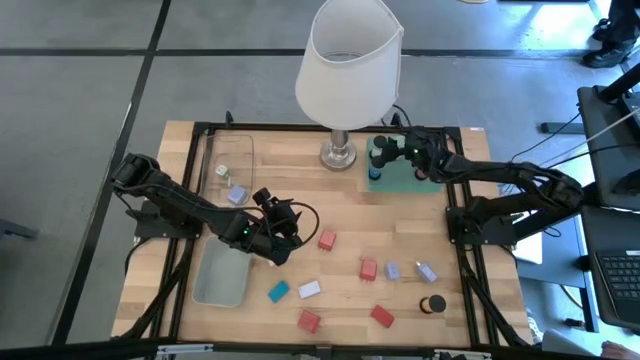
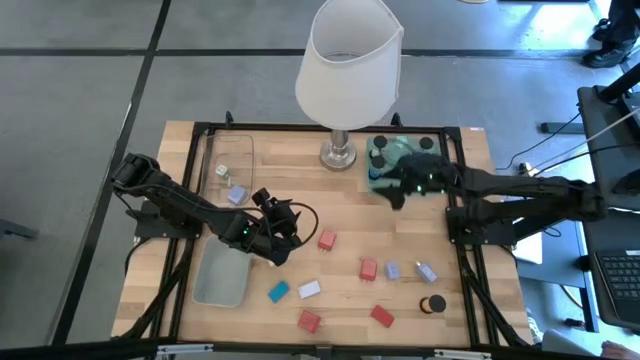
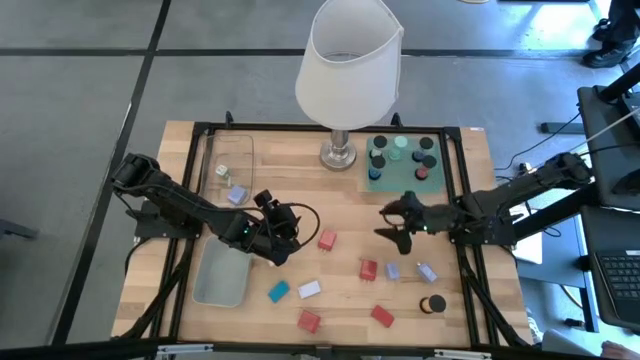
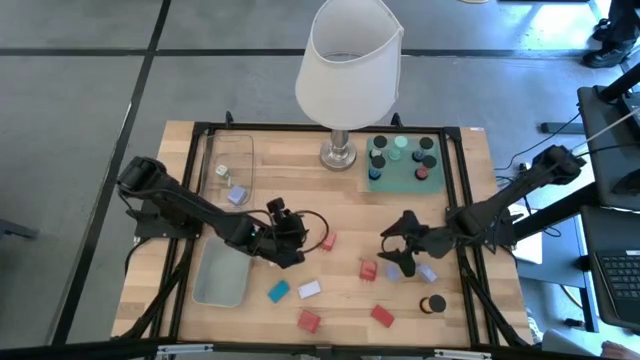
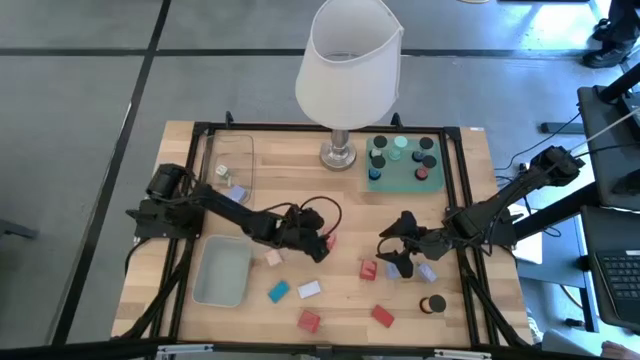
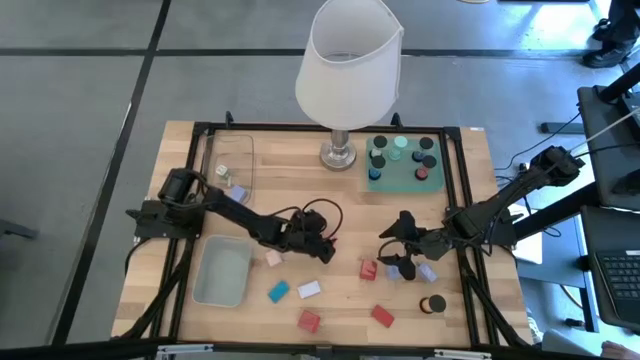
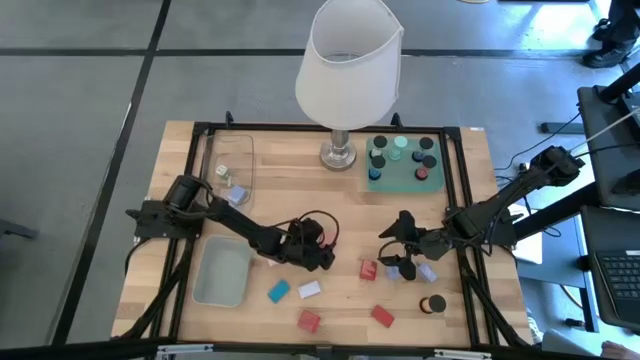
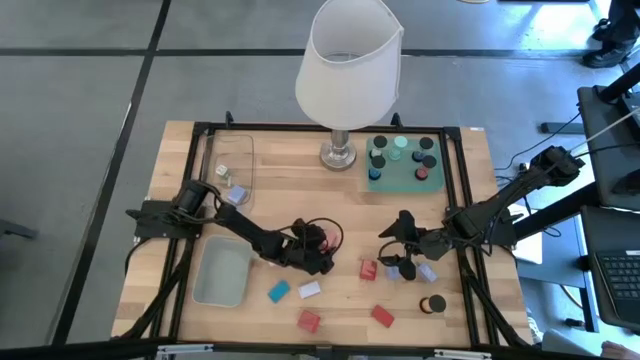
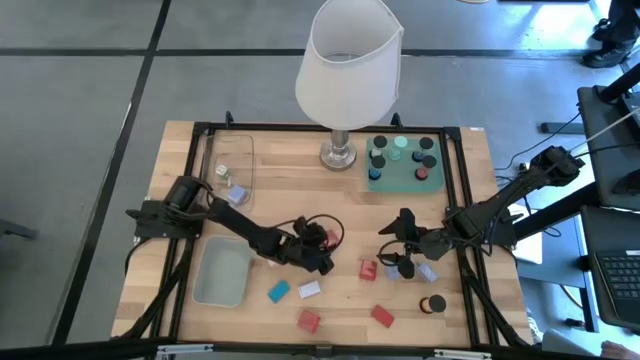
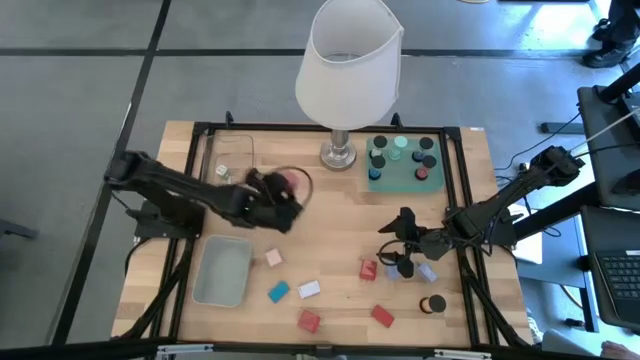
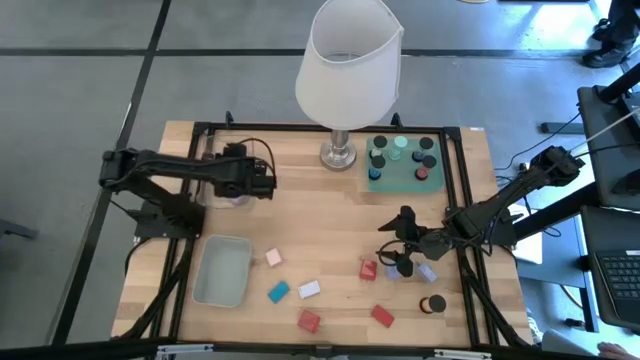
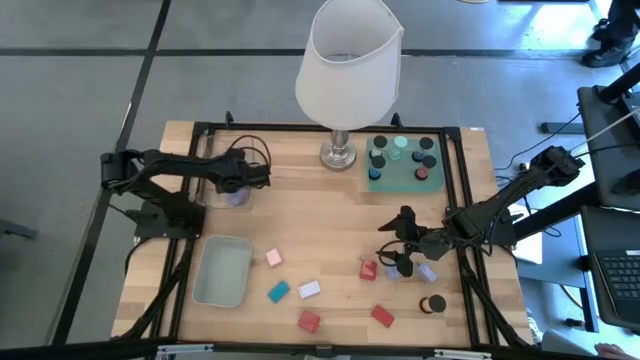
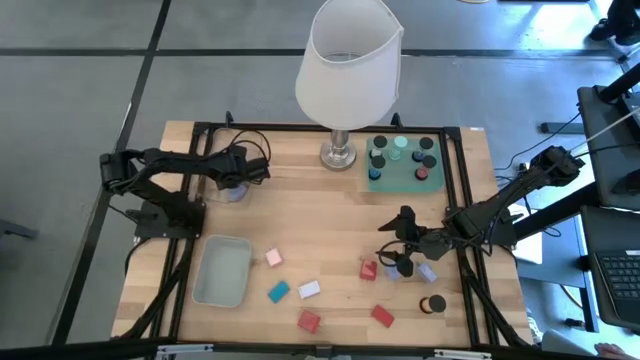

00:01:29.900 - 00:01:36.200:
Task: Pick & Place Office items
Put the red charger adapter into the transparent bin

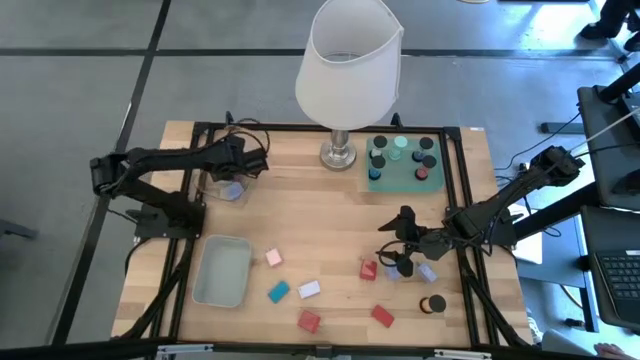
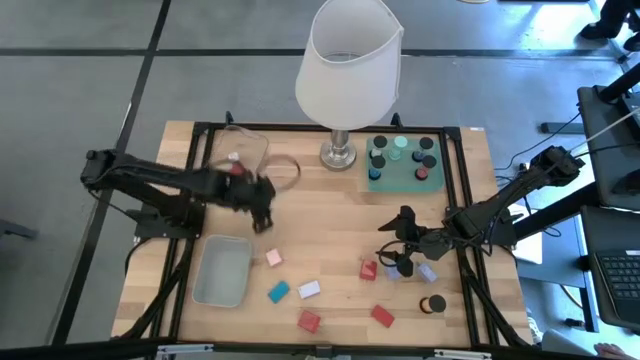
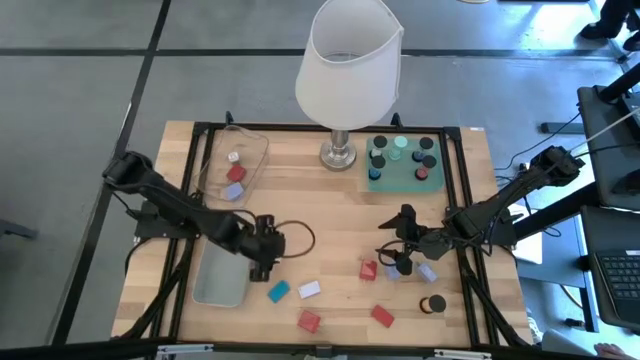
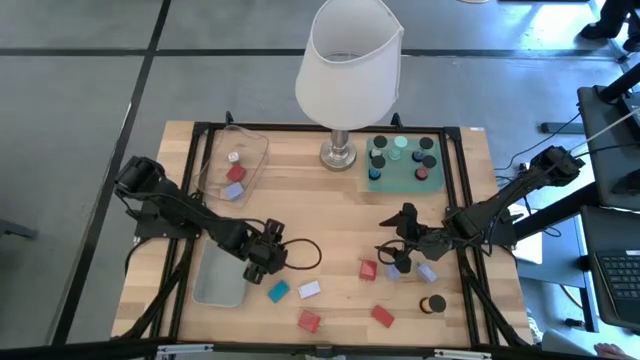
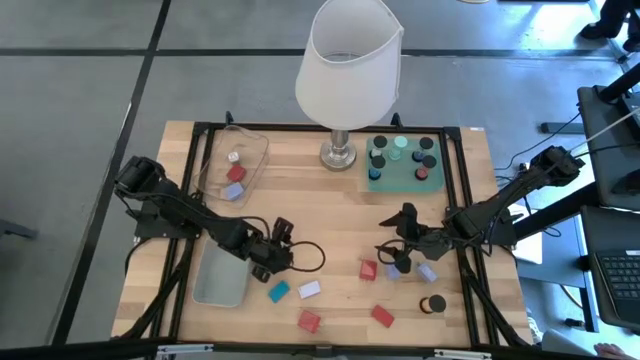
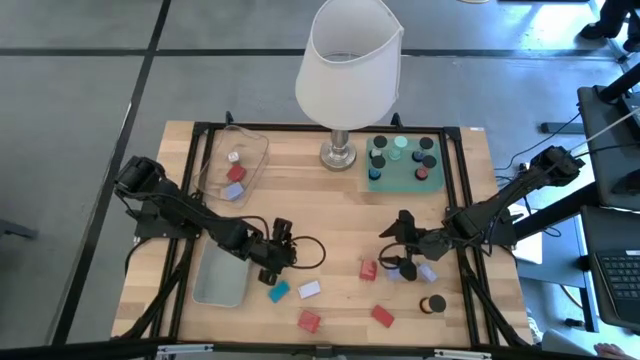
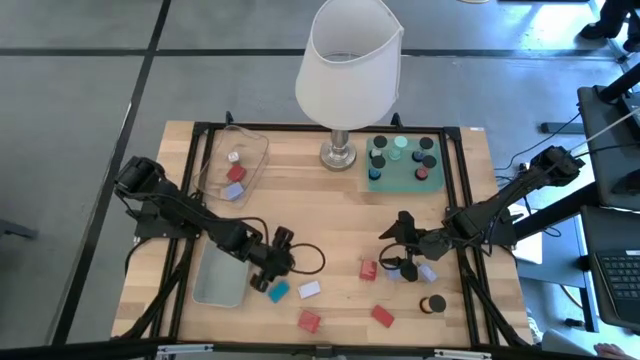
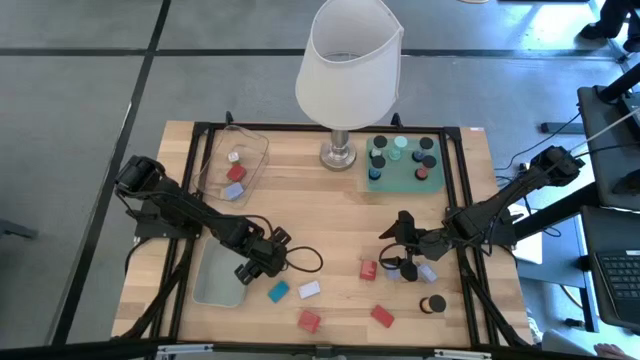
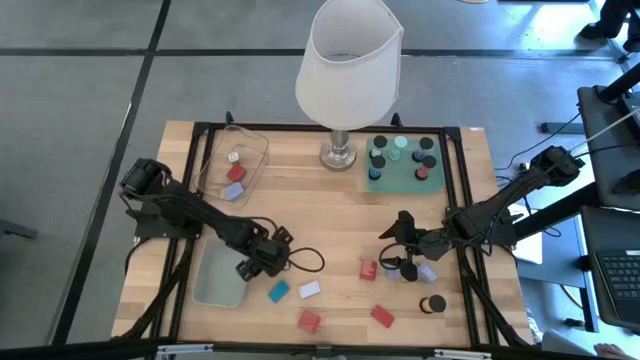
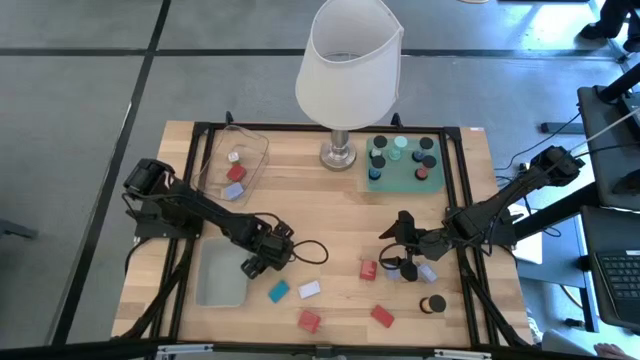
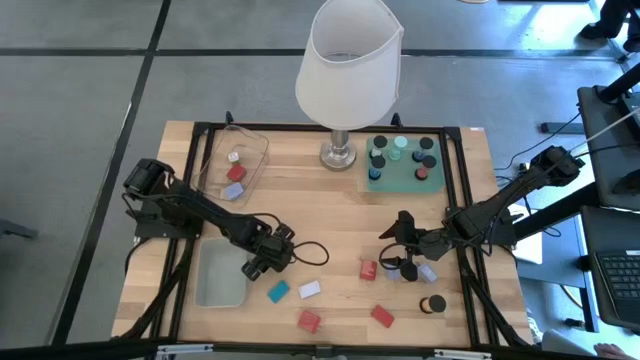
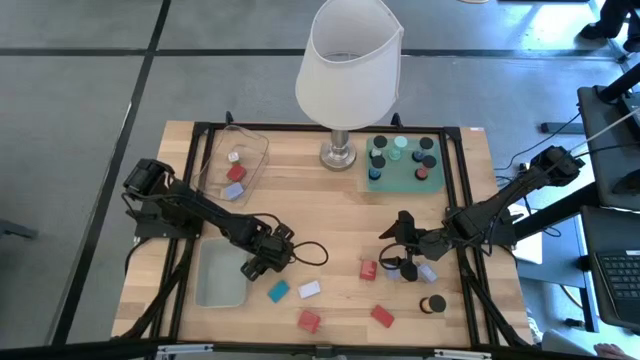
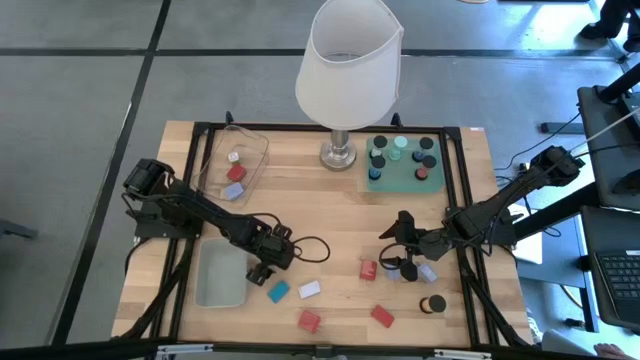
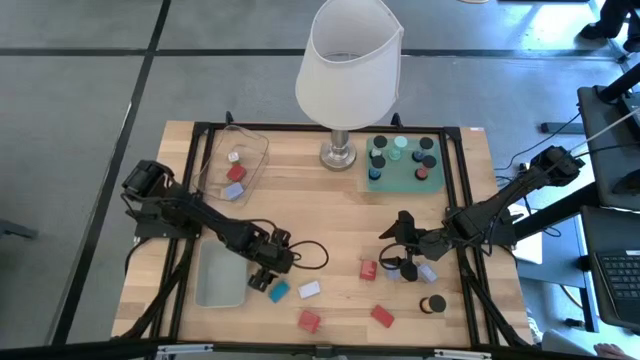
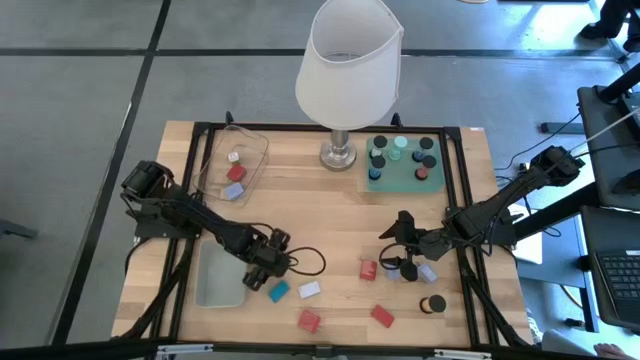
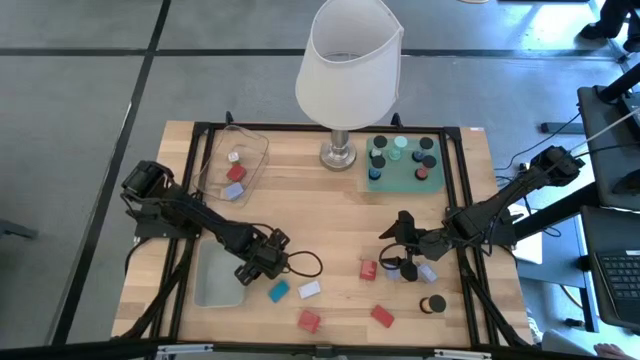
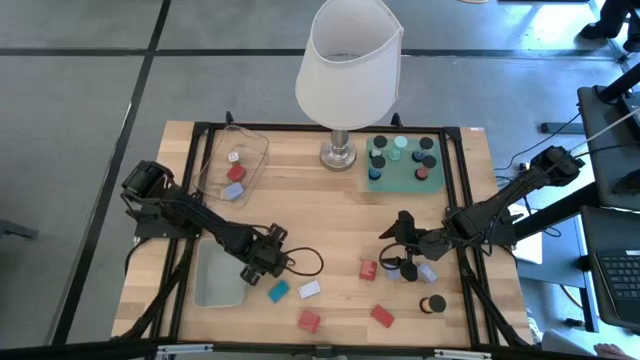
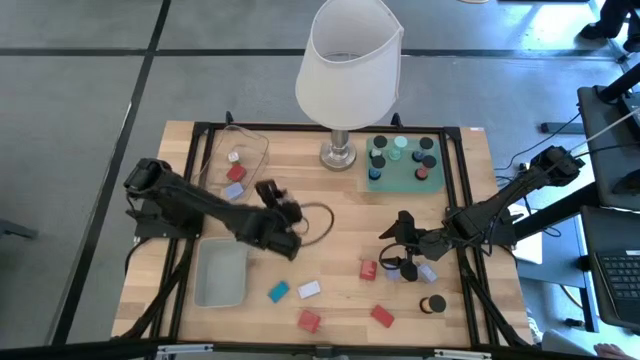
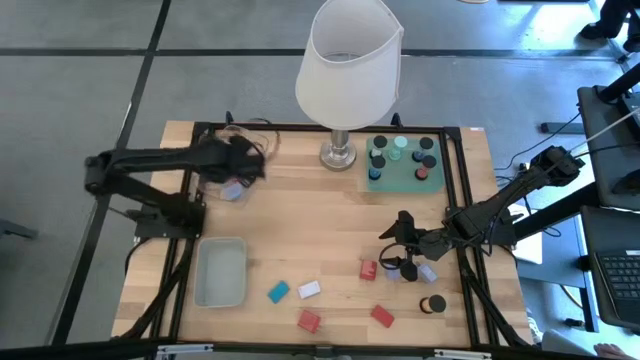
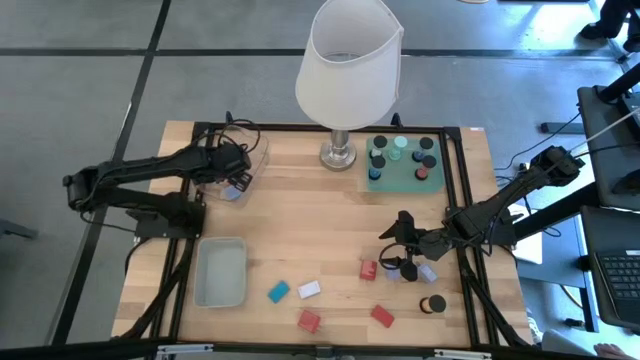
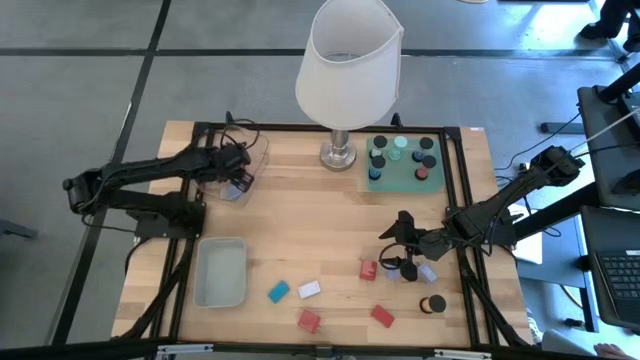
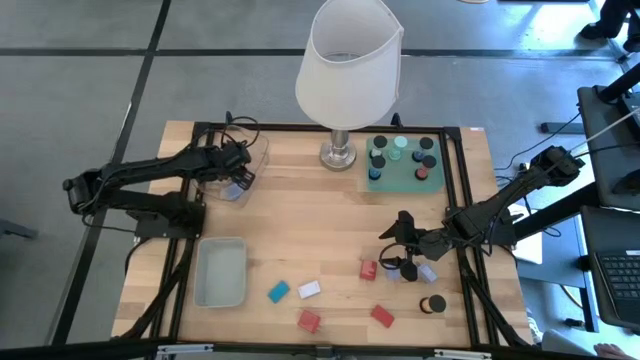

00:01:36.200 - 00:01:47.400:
Put the pink charger adapter into the transparent bin

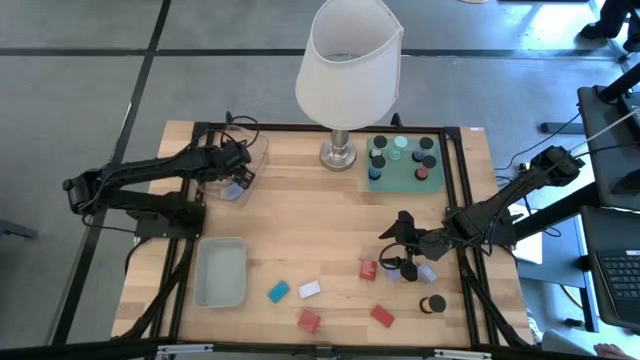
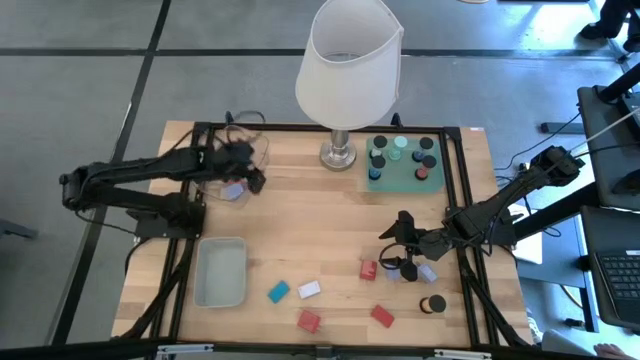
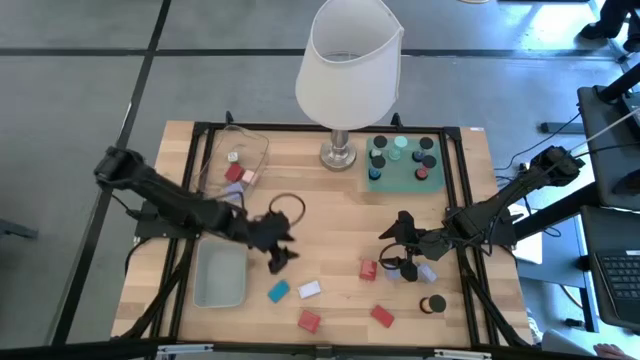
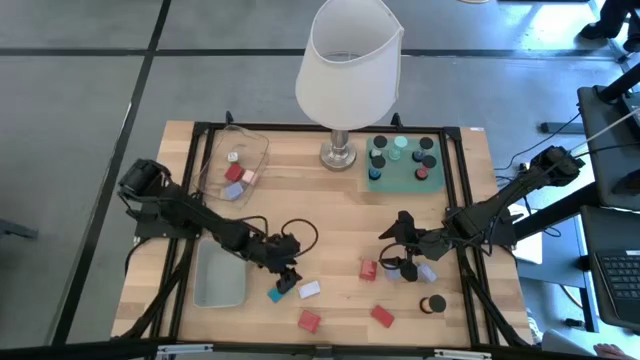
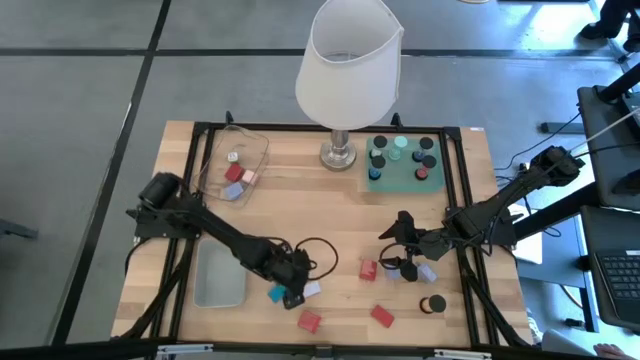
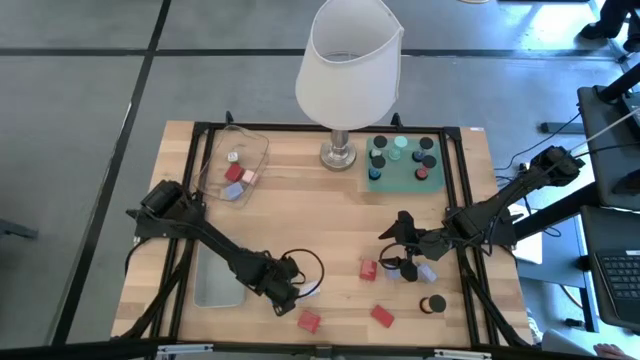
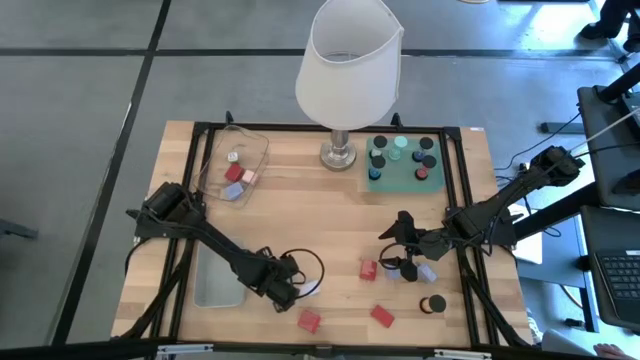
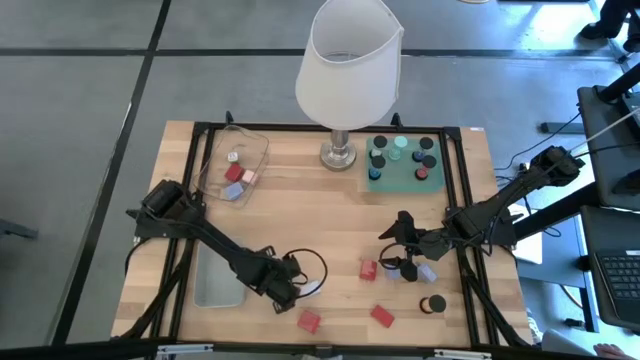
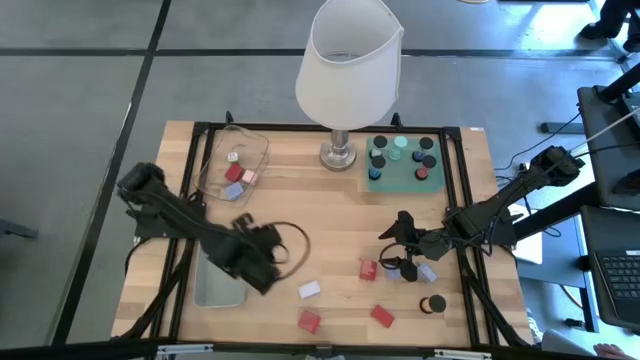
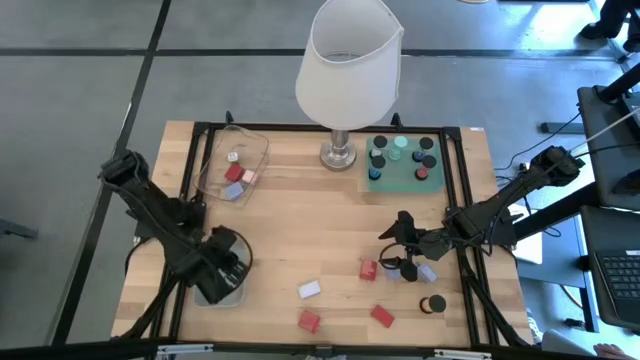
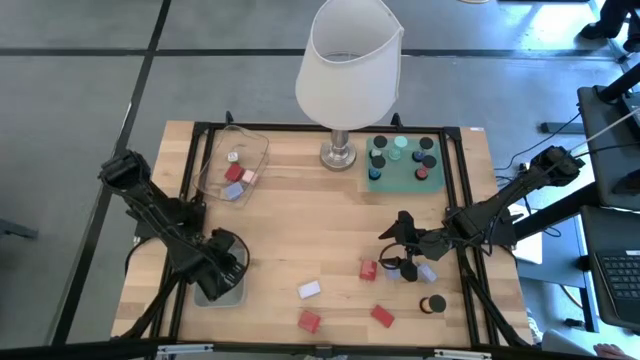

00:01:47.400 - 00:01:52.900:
Put the blue digital timer into the gray bin
